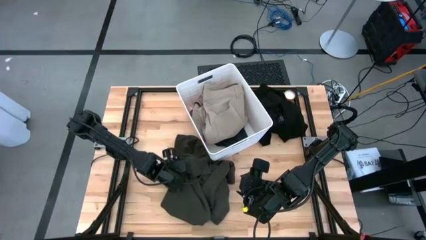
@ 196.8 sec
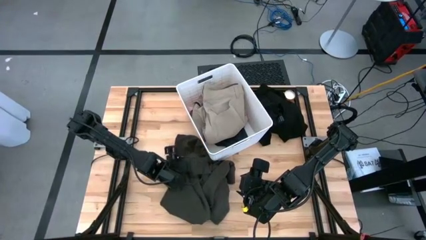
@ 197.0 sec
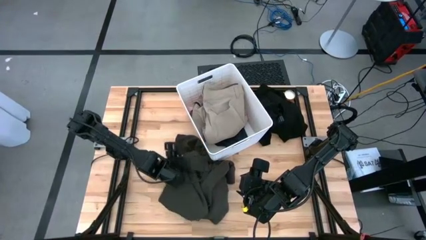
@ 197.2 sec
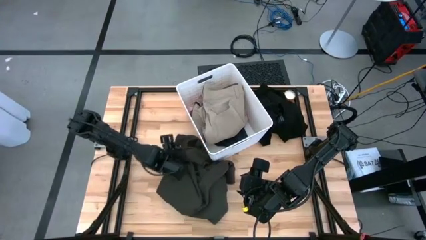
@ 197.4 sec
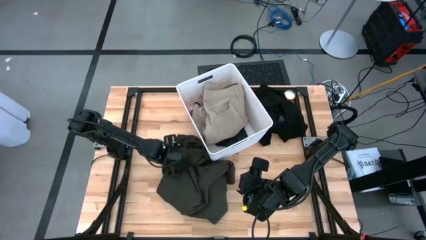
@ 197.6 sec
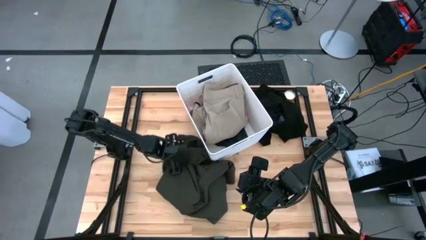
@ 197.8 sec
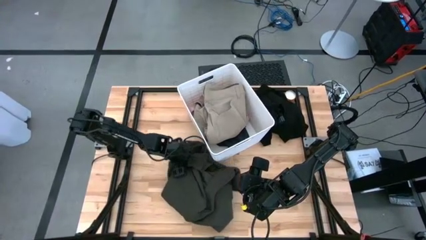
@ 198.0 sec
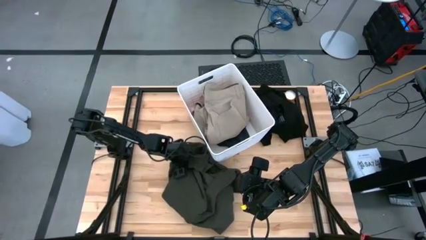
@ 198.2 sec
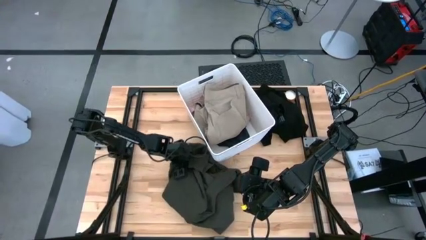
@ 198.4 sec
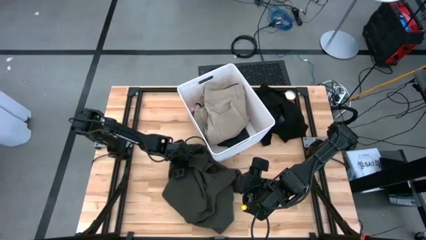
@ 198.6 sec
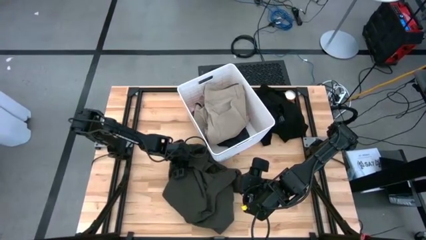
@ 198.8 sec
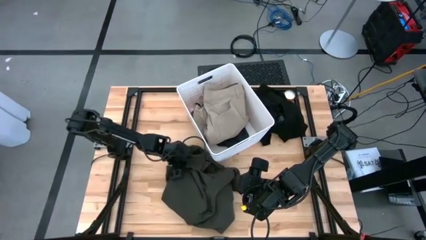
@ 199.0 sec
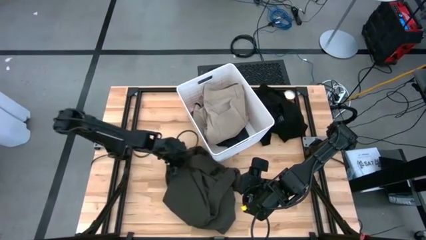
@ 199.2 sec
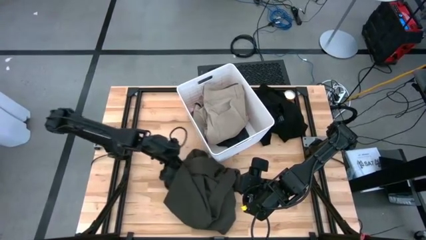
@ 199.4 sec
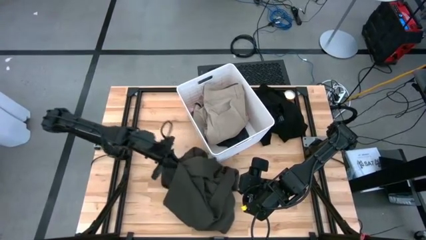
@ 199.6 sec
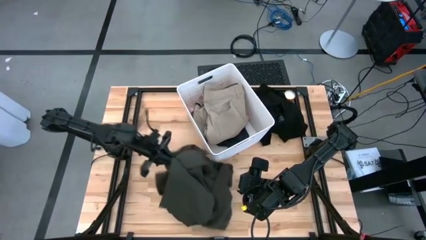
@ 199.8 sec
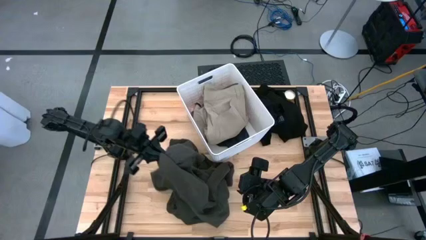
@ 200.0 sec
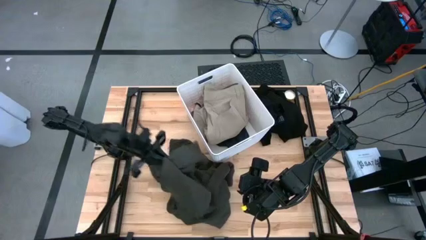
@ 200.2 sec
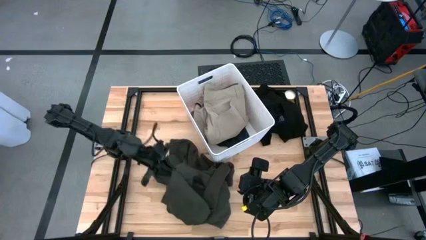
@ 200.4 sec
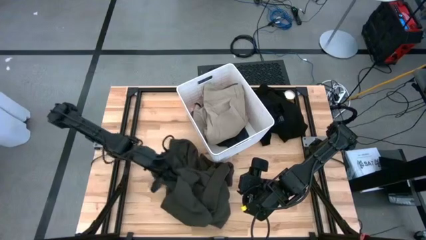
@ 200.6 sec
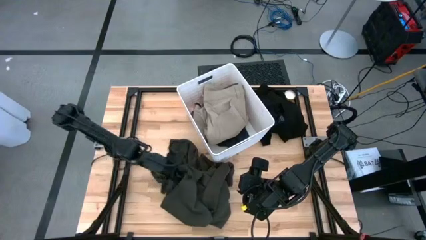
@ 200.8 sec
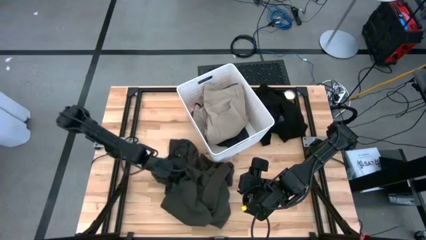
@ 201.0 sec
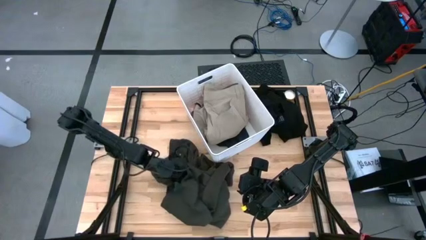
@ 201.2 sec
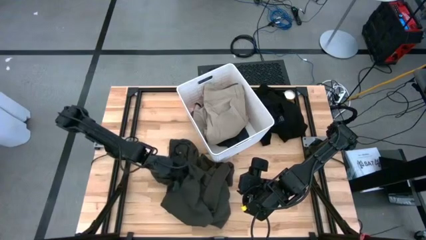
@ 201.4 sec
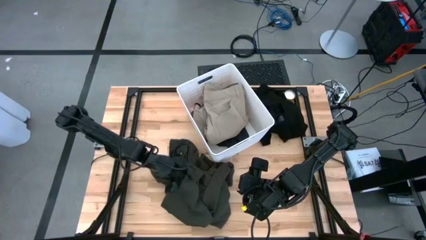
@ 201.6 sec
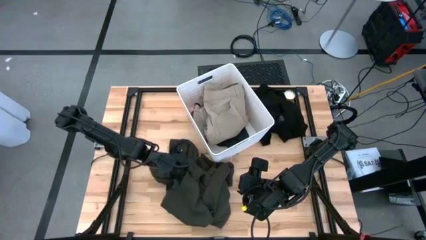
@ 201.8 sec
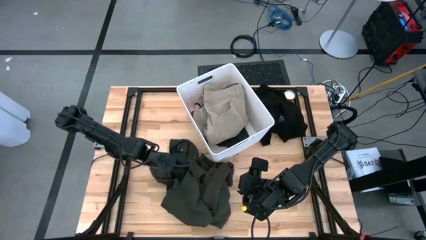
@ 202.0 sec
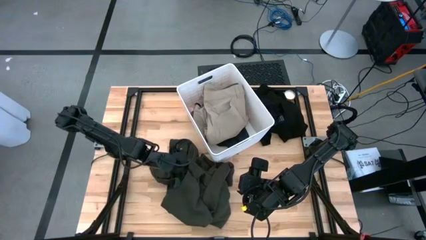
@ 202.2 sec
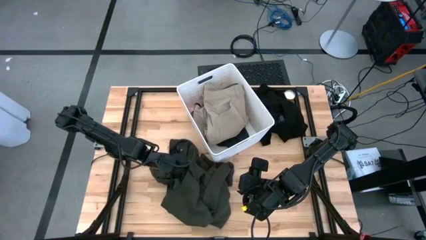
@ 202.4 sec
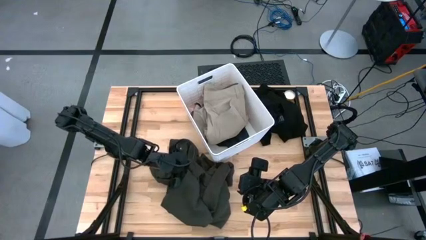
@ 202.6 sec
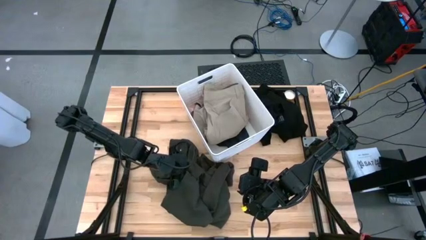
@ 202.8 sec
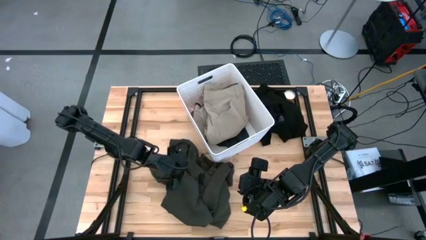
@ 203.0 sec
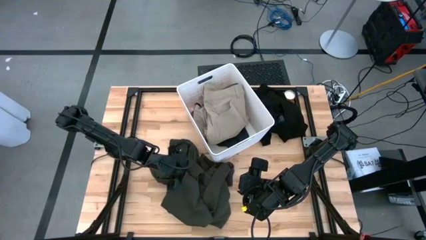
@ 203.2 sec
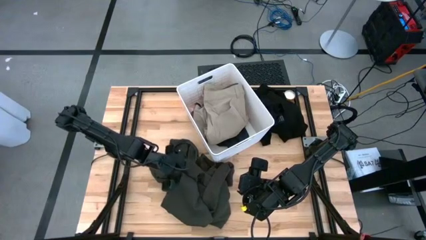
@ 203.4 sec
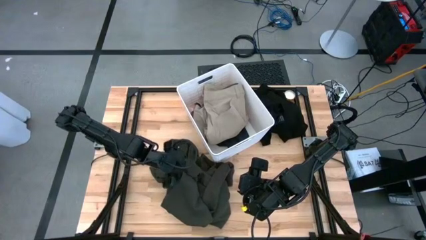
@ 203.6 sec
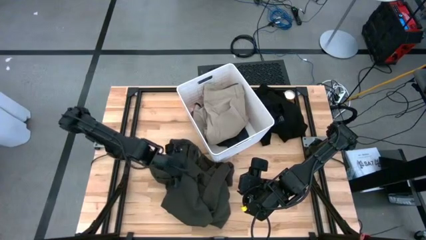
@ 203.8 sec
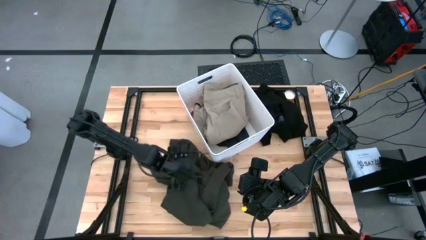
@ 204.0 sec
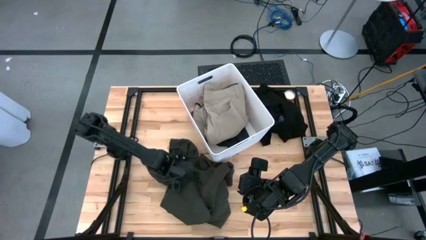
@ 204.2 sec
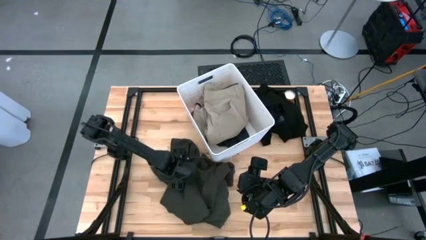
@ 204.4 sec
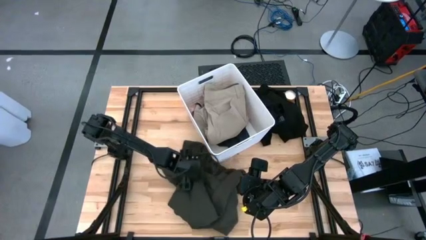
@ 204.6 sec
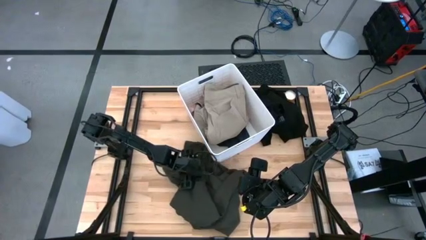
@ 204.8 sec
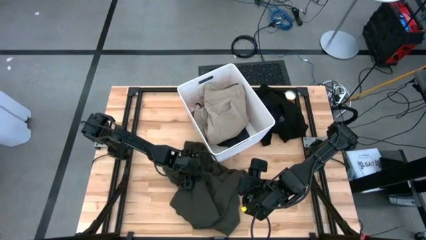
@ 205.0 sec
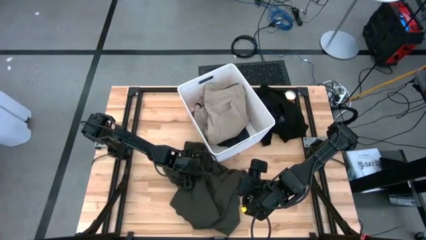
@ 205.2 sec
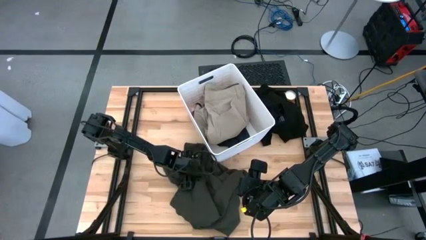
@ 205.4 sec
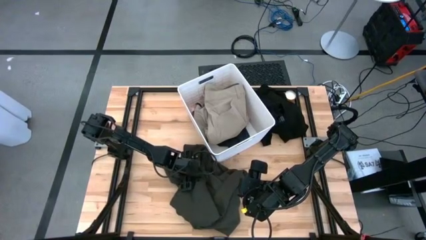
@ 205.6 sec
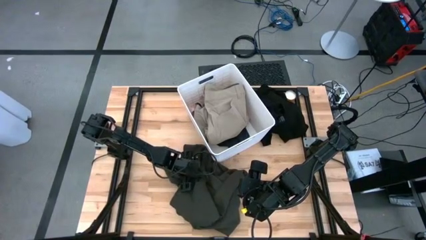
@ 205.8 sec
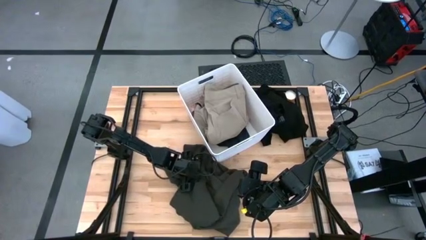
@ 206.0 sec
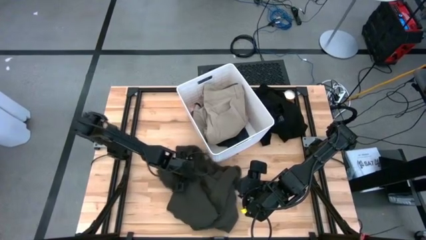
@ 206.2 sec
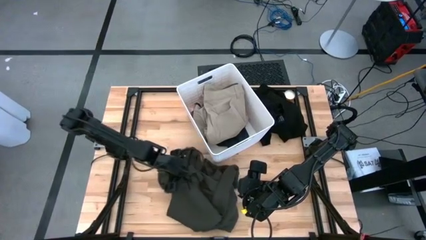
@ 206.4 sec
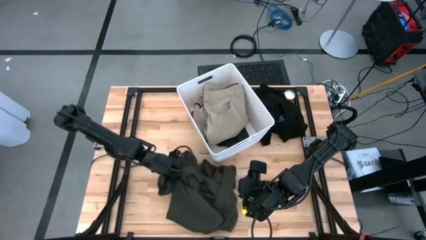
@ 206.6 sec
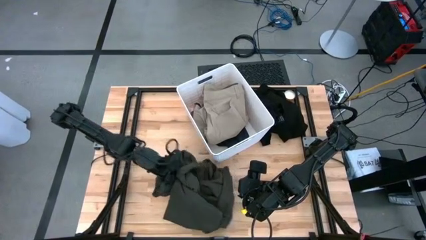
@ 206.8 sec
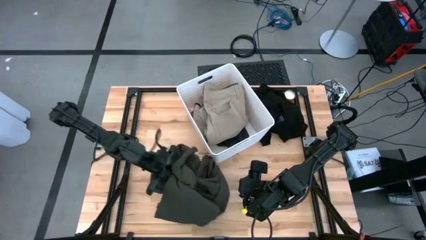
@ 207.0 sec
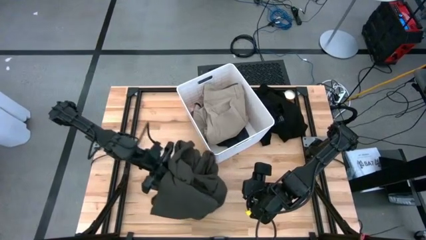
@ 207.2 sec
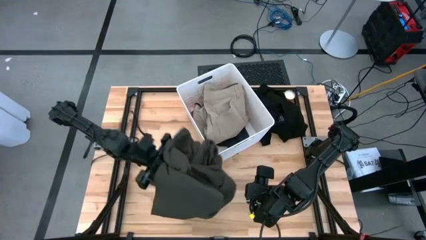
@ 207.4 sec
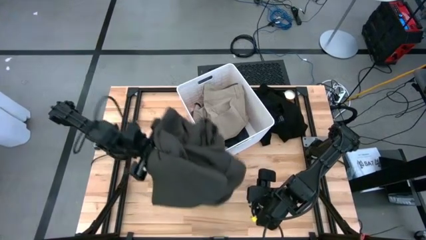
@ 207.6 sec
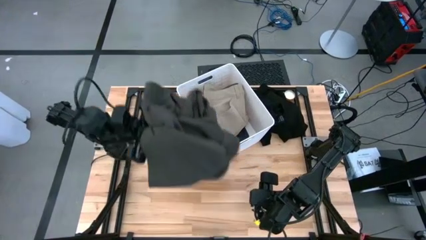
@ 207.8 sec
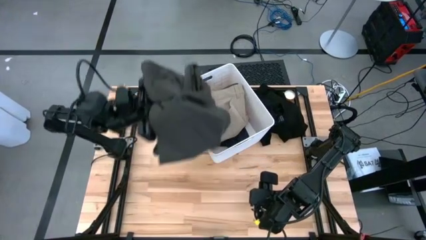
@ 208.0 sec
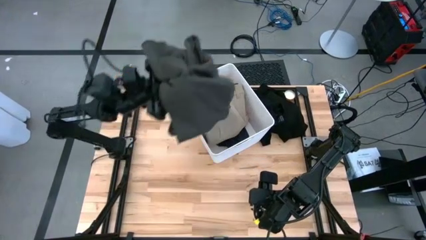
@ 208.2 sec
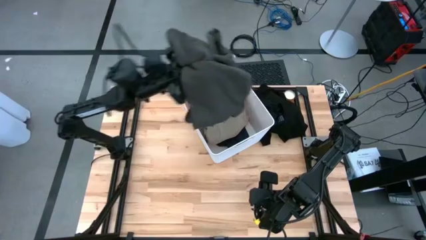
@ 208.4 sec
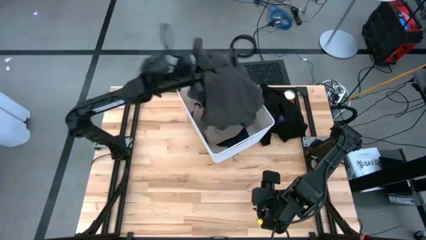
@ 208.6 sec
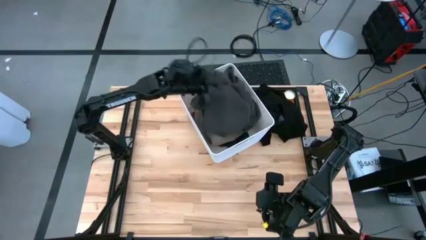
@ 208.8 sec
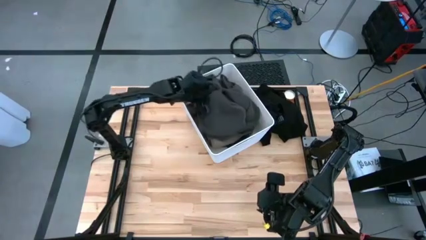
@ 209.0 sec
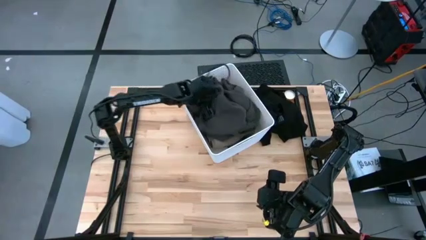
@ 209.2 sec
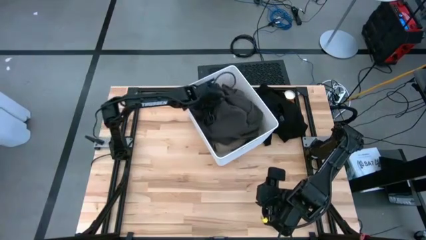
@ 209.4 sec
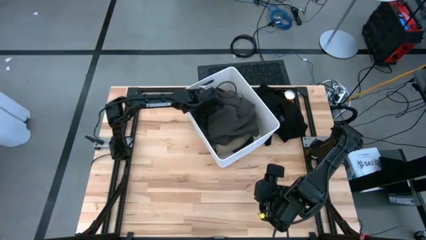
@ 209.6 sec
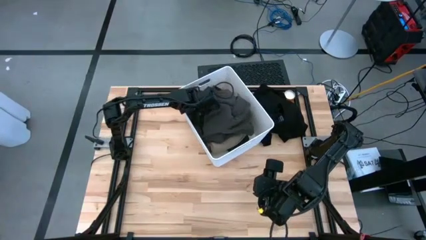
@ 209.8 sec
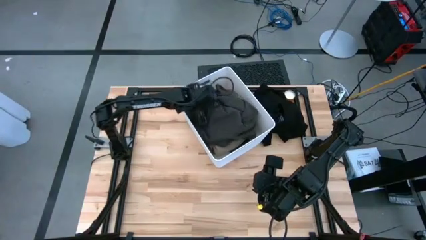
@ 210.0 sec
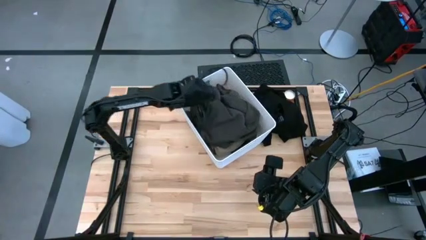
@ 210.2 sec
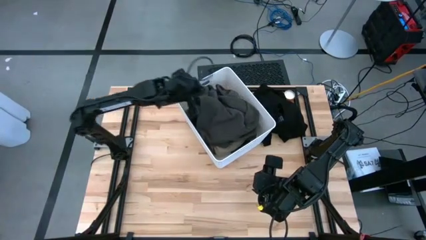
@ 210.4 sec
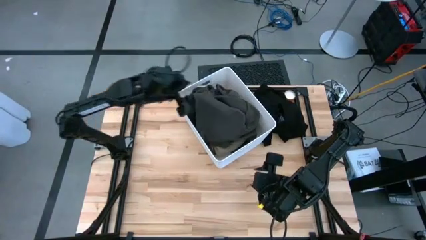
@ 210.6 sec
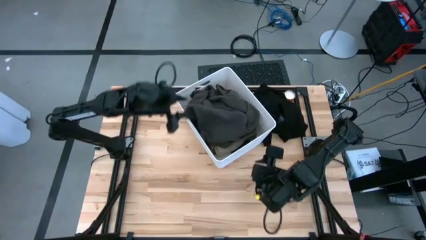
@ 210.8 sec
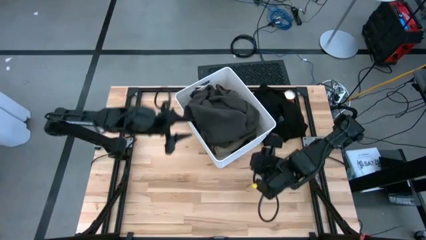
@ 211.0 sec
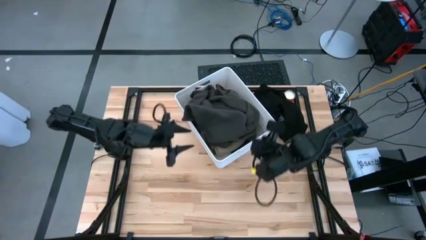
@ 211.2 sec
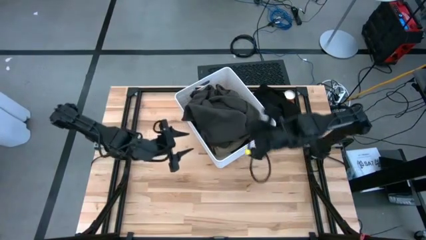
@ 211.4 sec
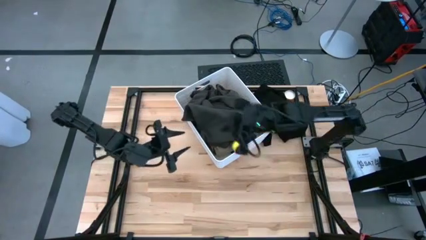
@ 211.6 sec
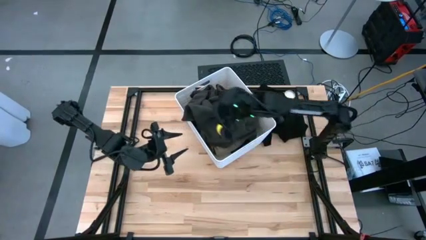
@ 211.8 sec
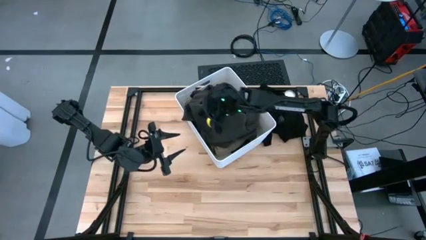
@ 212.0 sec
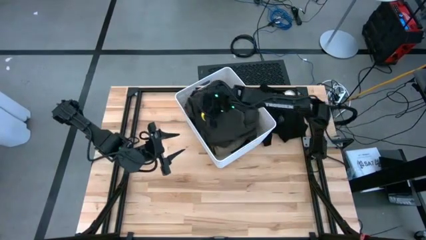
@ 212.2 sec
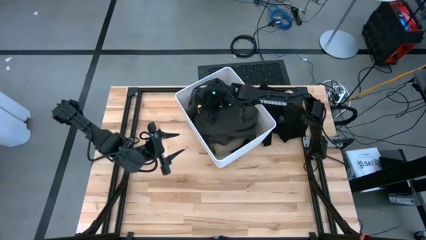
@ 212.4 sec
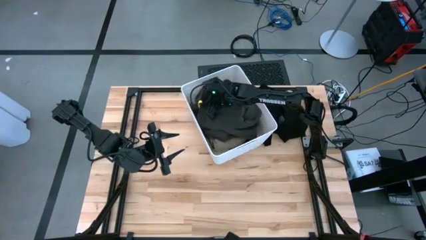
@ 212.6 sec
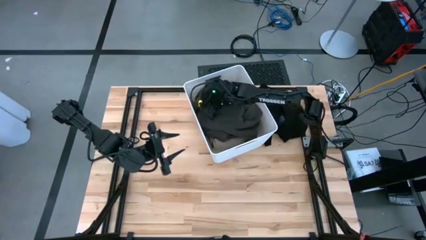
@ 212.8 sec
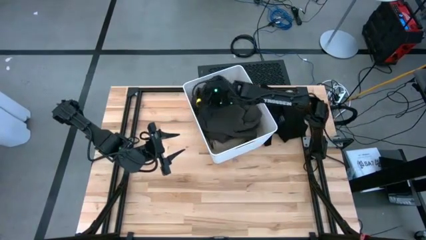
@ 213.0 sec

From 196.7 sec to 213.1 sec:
Task: Sort clothes
Put the folded gray jacket into the white laundry bin
